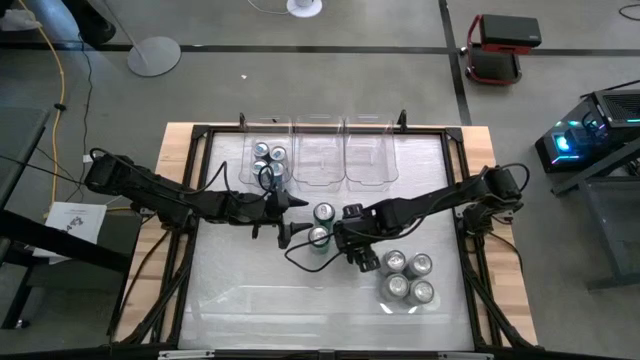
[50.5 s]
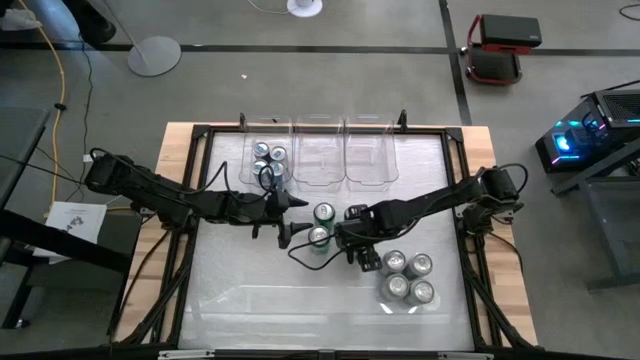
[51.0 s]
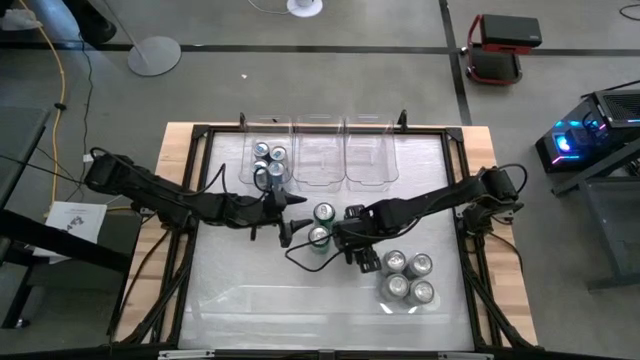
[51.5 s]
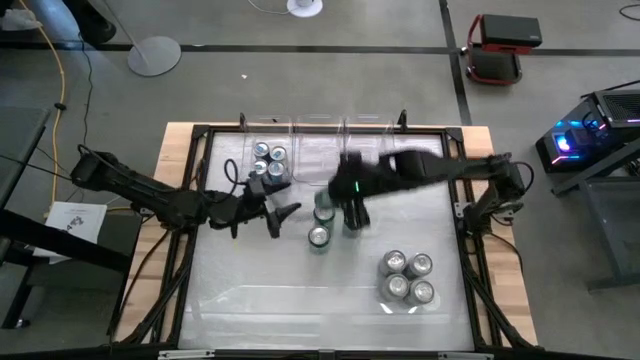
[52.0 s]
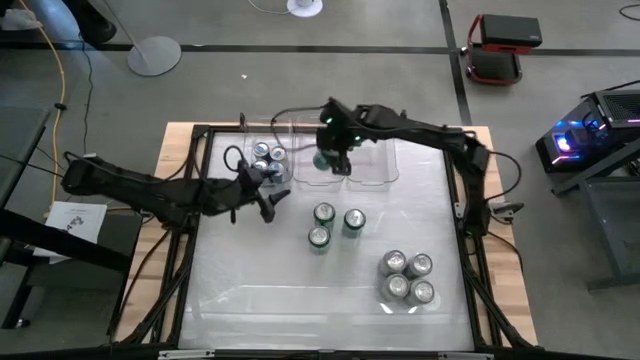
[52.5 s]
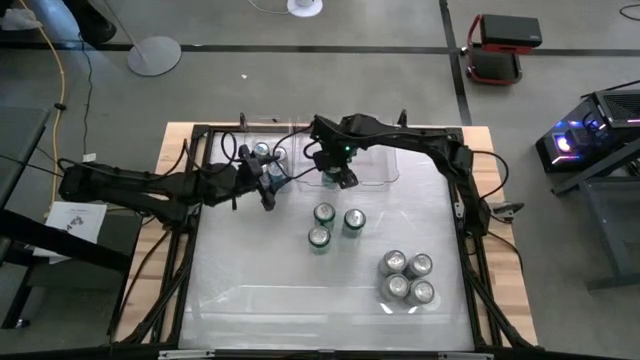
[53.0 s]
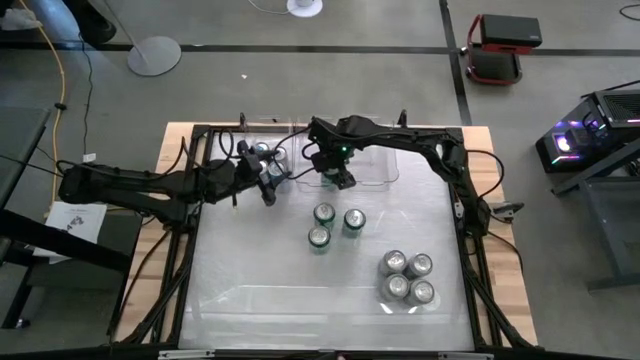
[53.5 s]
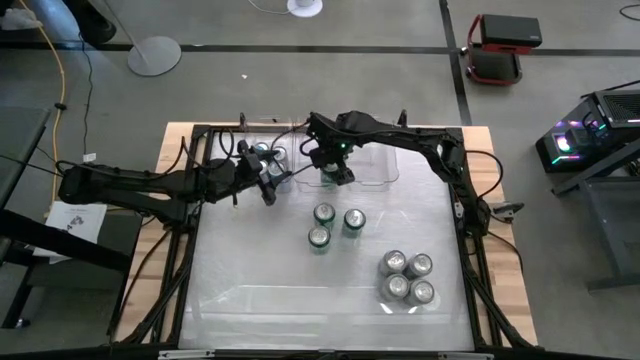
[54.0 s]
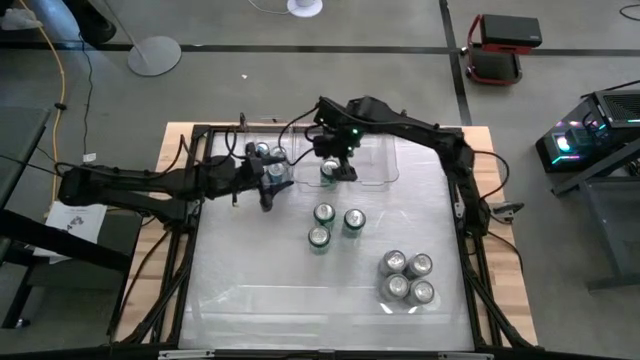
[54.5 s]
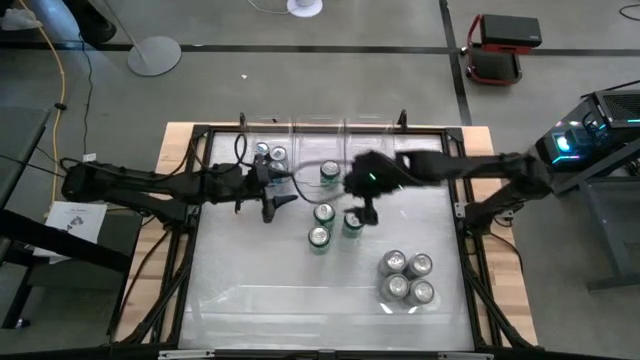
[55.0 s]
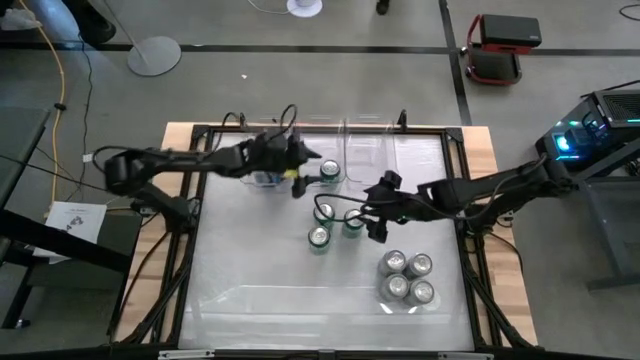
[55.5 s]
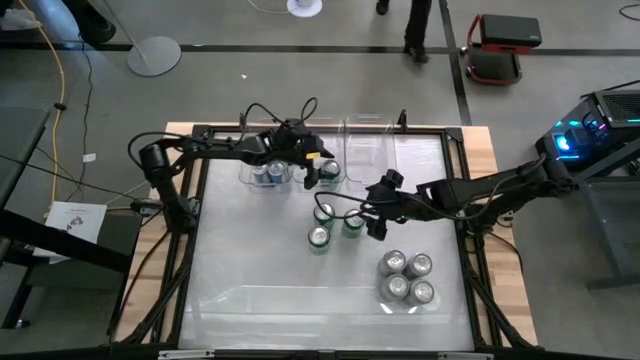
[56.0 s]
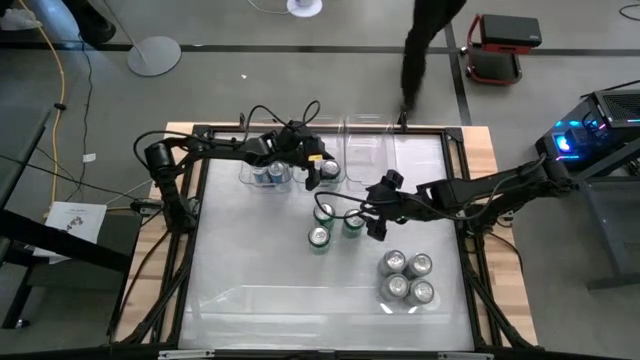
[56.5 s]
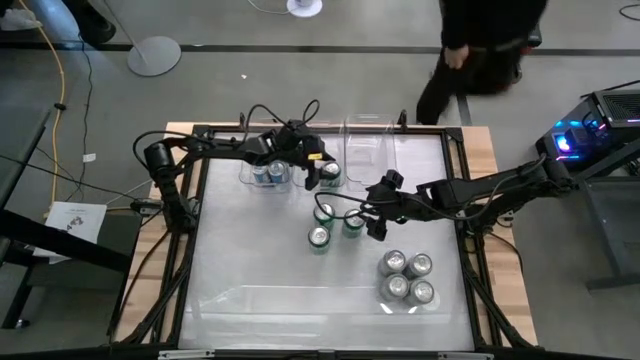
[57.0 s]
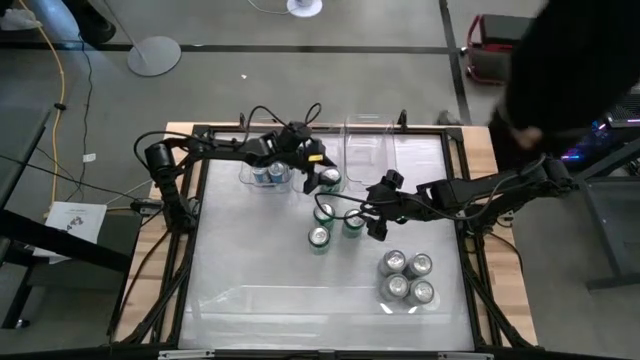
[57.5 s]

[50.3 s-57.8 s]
Task: Sort soda cans
Put the bottom right green soda can into the center transparent bin

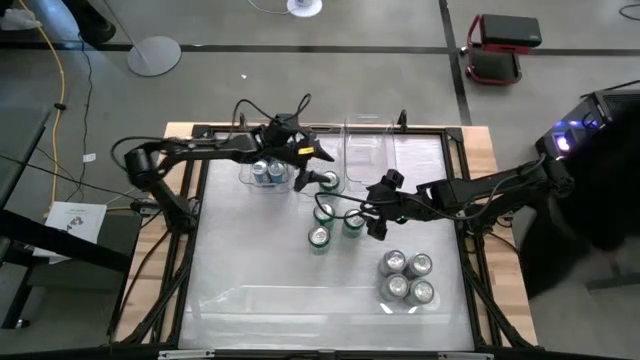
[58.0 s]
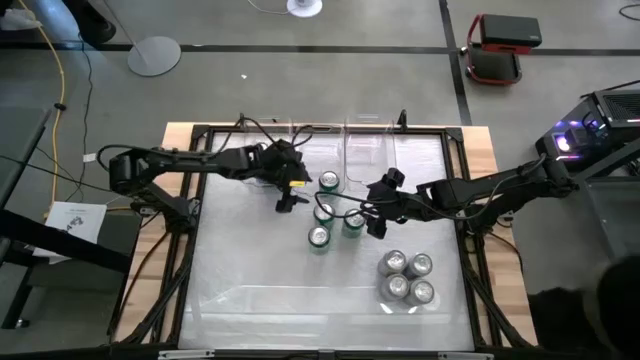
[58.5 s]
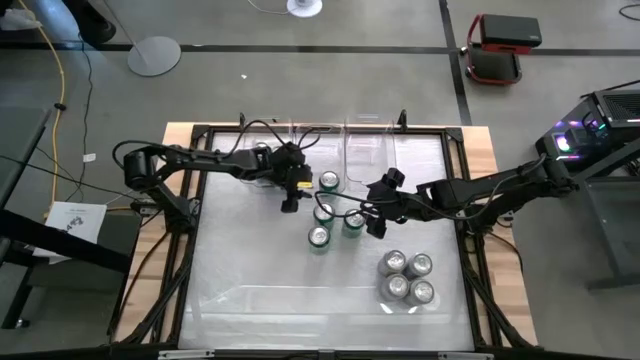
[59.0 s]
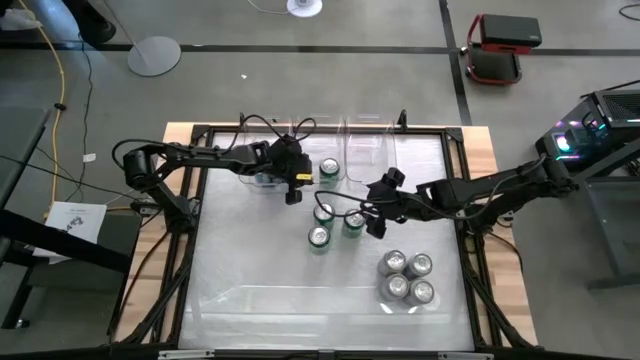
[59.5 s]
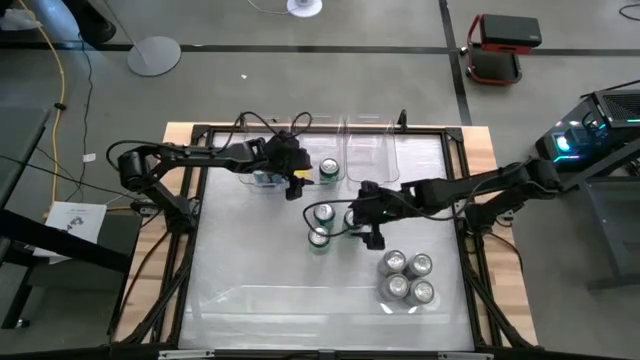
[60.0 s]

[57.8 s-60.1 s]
Adjust the center transparent bin

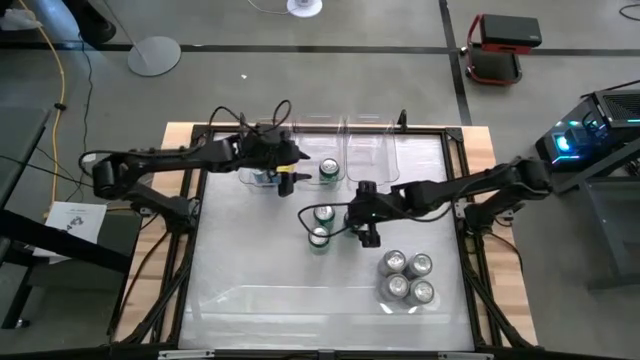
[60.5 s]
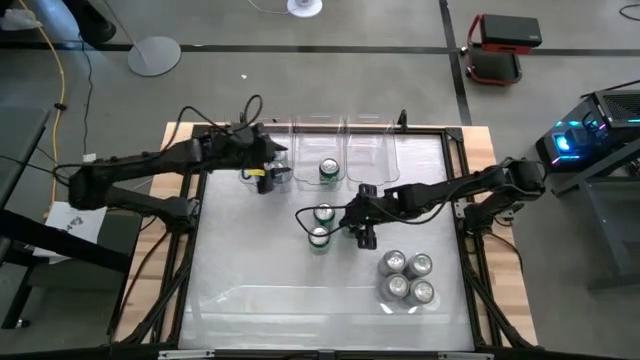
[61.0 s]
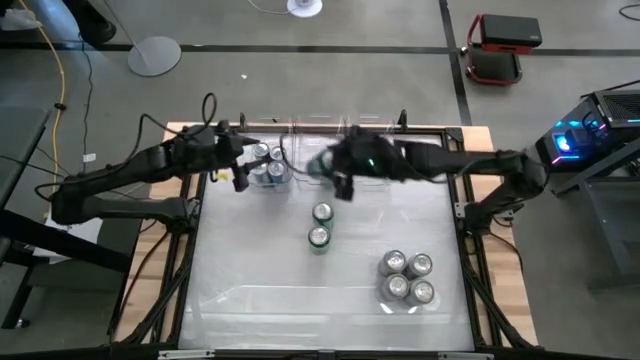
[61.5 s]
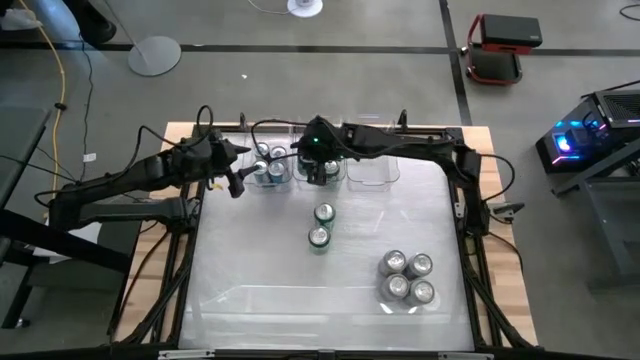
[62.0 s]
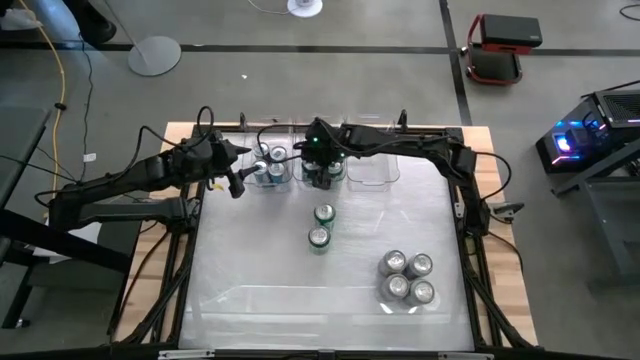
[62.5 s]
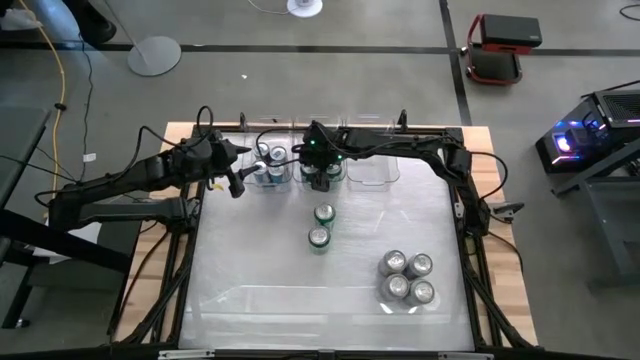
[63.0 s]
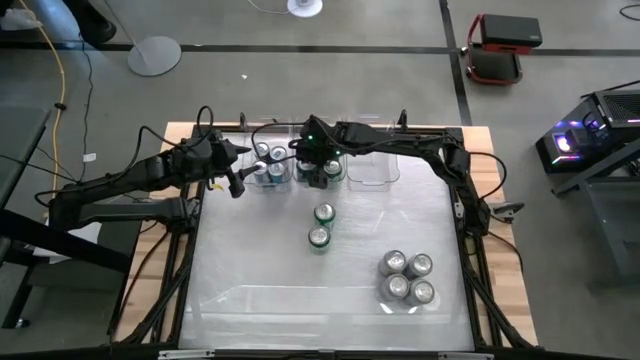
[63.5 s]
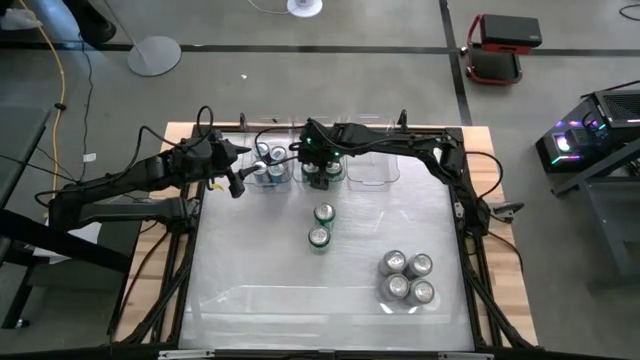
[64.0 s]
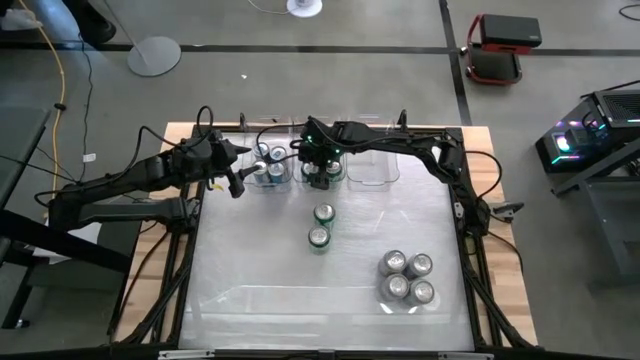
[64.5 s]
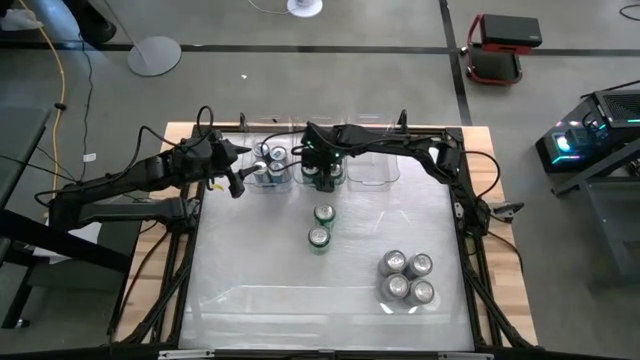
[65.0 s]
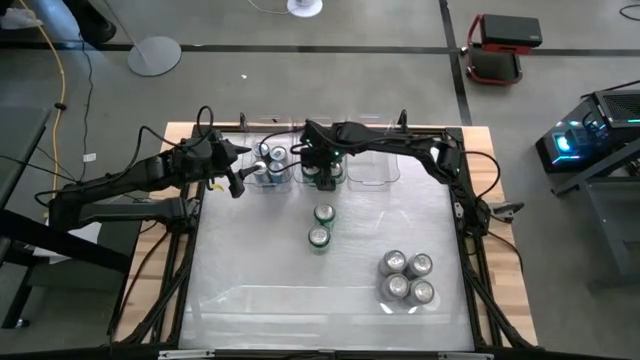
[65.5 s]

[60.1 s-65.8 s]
Put the top right green soda can into the center transparent bin

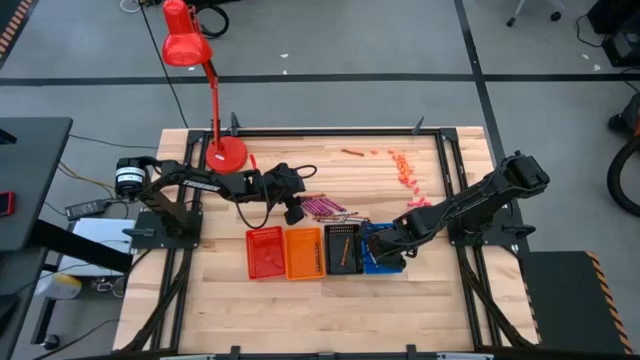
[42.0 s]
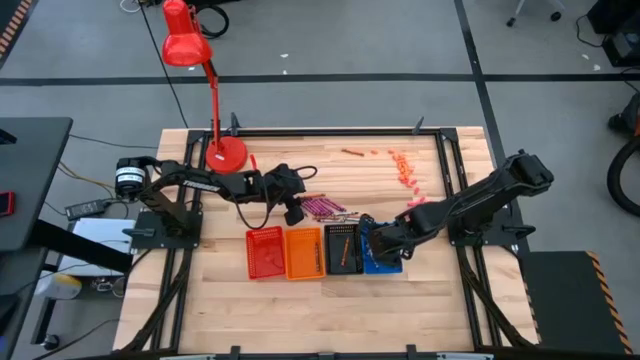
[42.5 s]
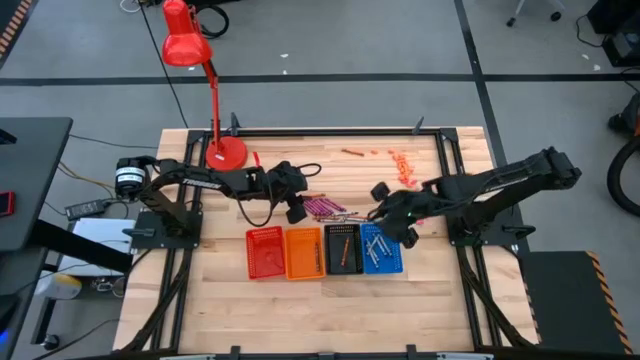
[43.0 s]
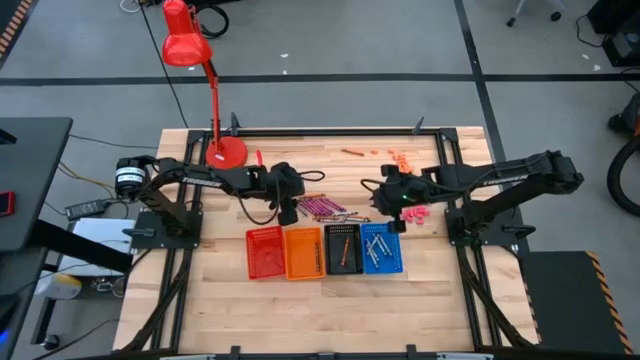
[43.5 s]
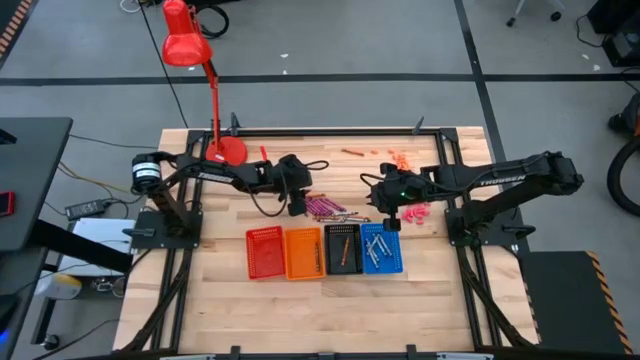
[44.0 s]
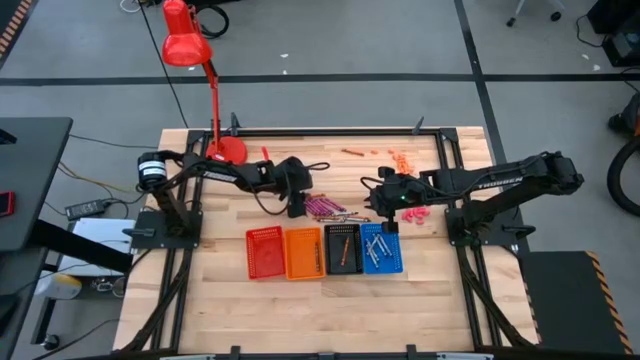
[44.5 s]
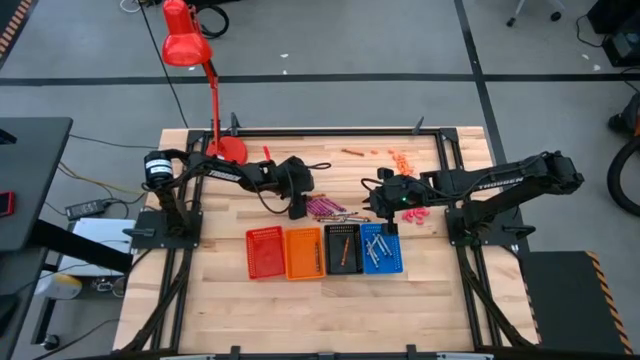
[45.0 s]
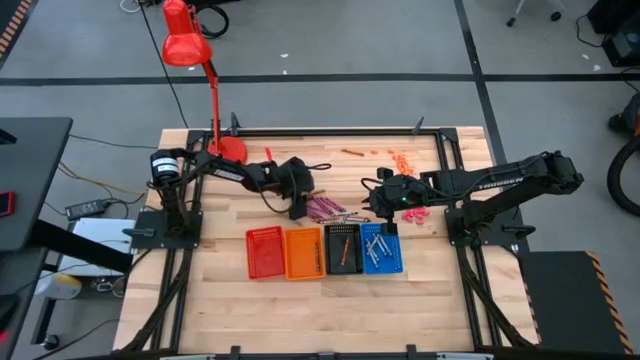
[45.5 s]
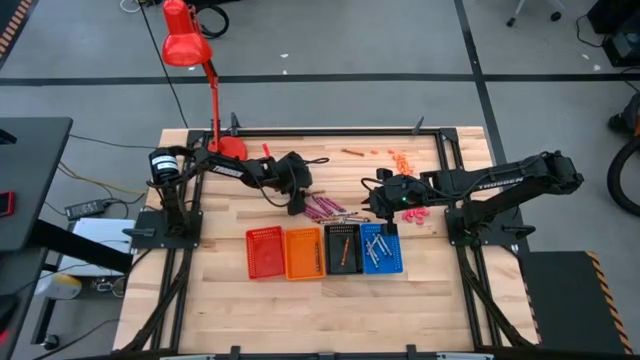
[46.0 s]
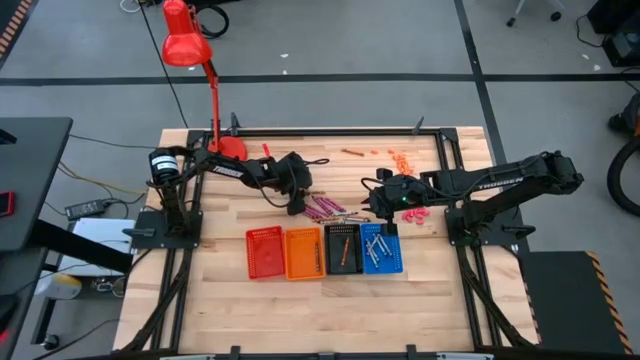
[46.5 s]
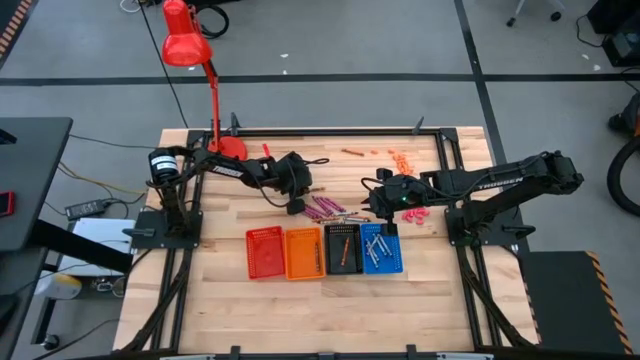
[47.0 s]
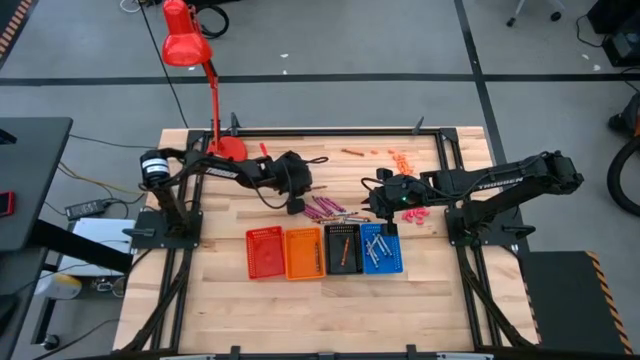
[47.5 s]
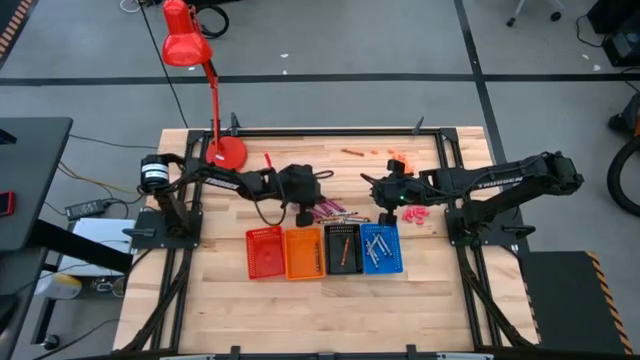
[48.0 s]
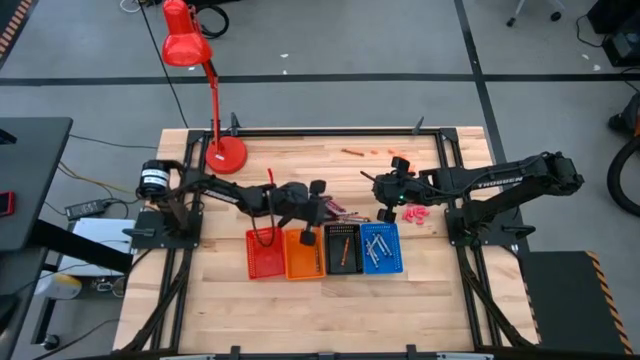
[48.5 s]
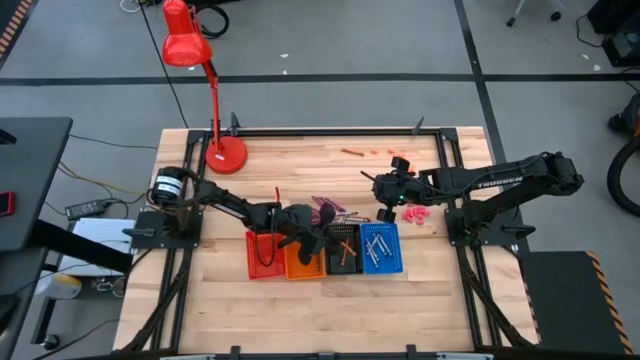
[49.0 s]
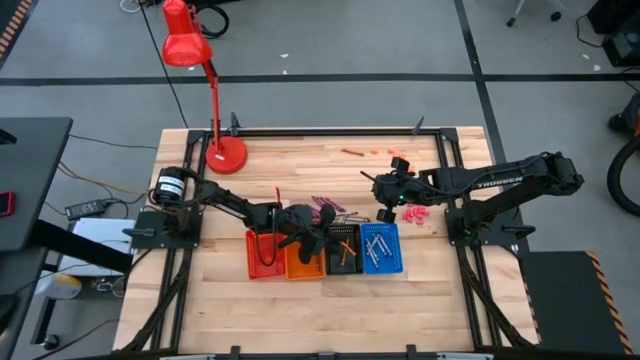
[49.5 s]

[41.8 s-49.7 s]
Task: Sort crayons
Put the orange crayon into the black bin
